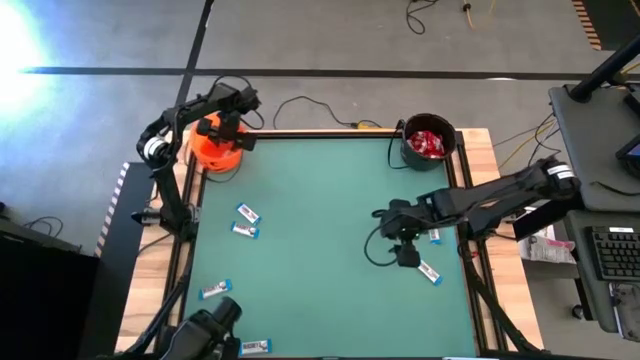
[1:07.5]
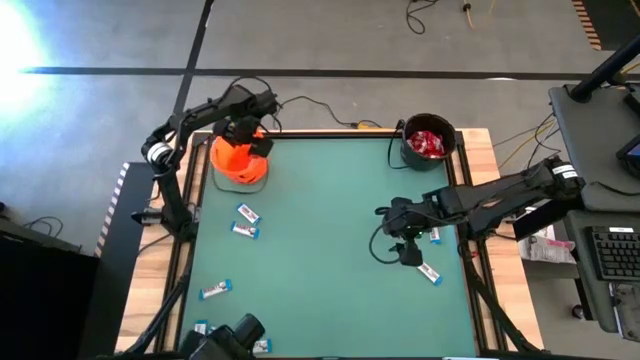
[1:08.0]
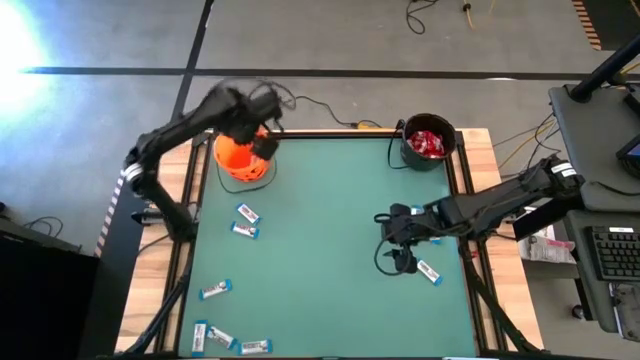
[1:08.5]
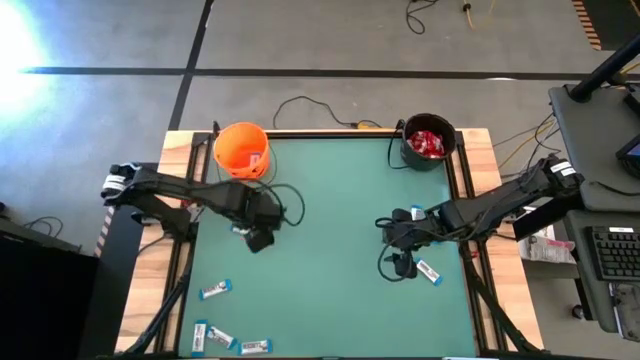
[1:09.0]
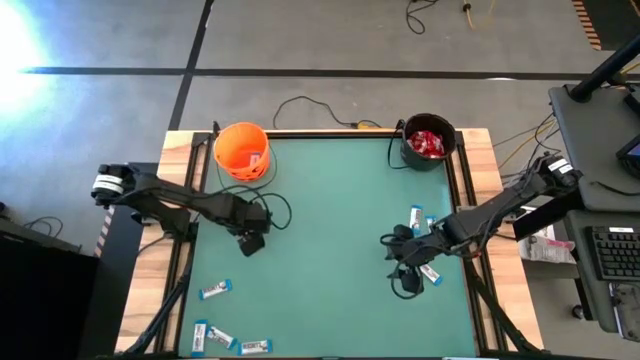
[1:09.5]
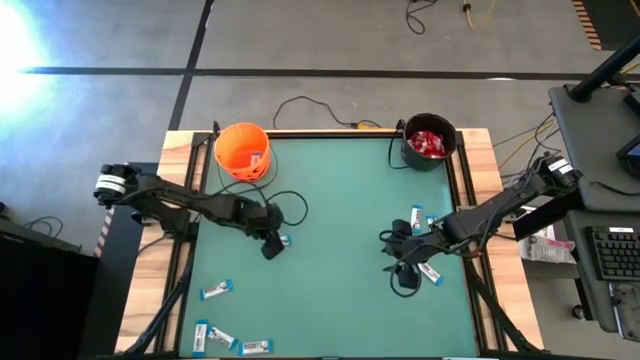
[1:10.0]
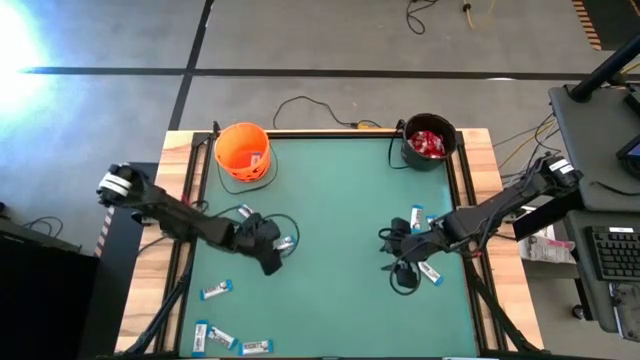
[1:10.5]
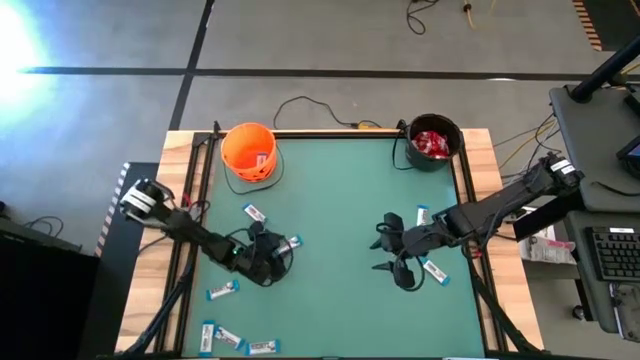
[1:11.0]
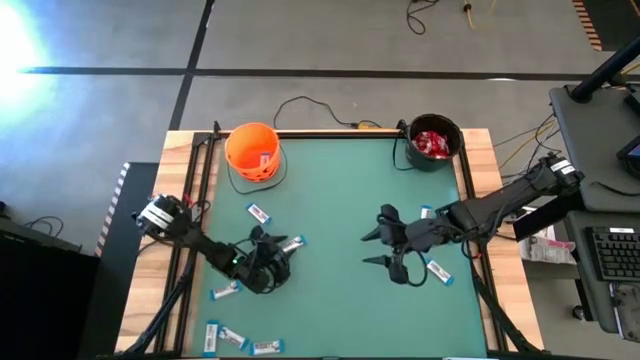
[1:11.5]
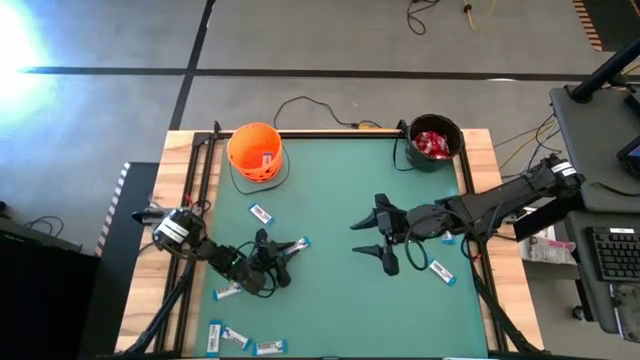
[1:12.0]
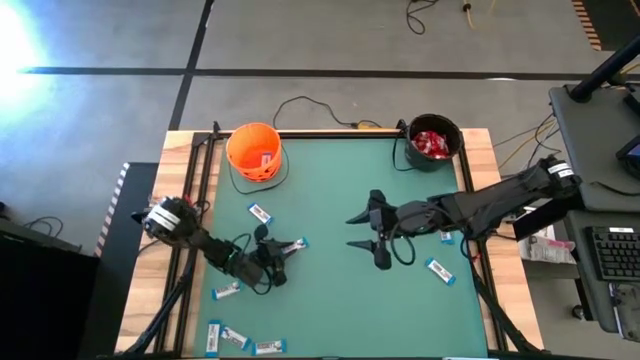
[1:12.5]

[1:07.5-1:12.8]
Task: Sort candy by brand, put in halloween buckets
Put the white chocolate into the orange bucket

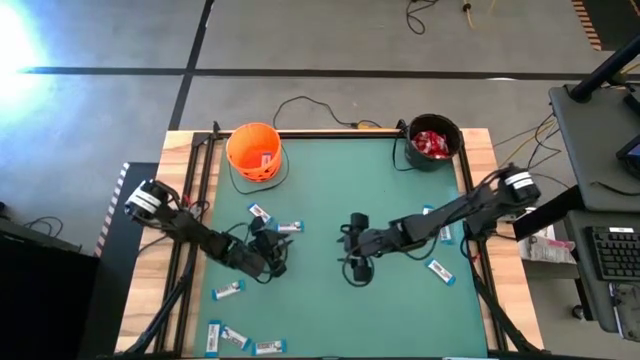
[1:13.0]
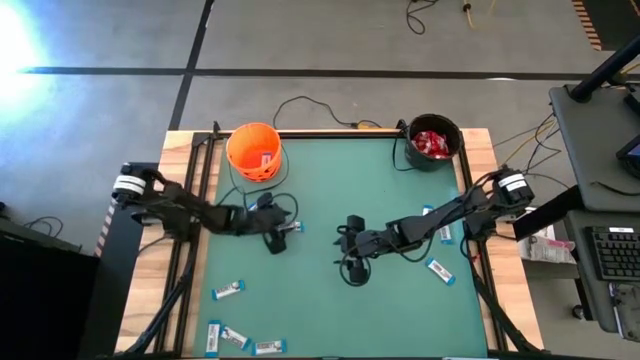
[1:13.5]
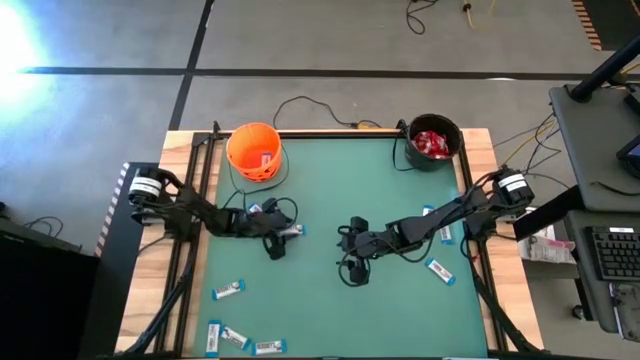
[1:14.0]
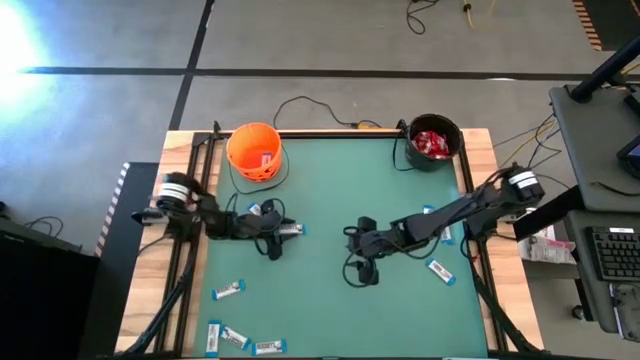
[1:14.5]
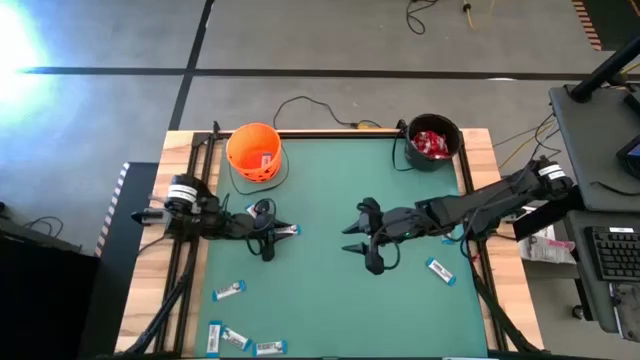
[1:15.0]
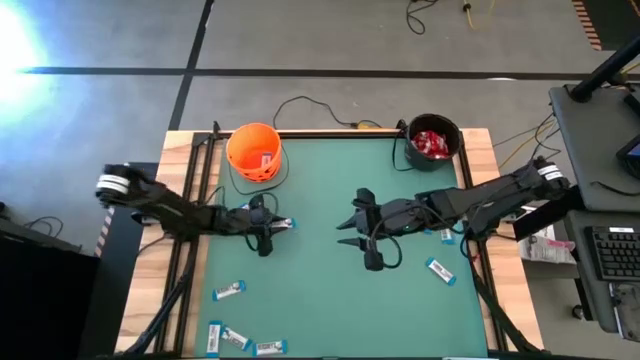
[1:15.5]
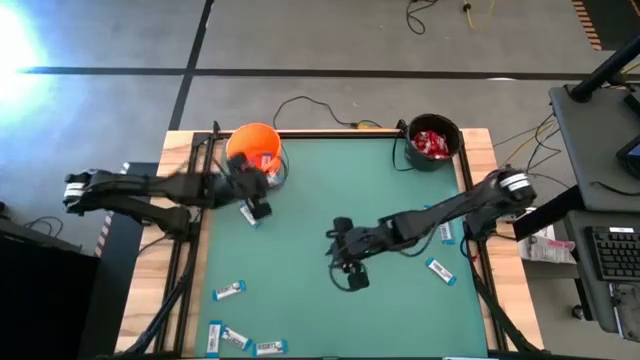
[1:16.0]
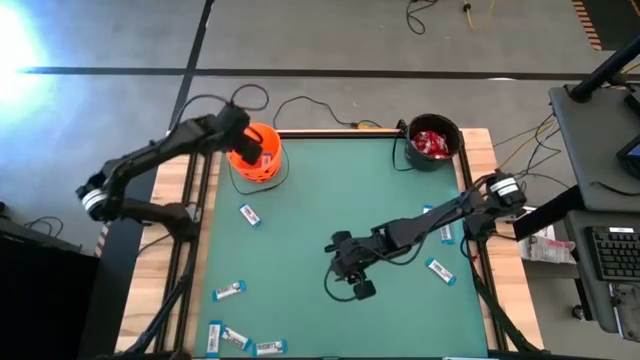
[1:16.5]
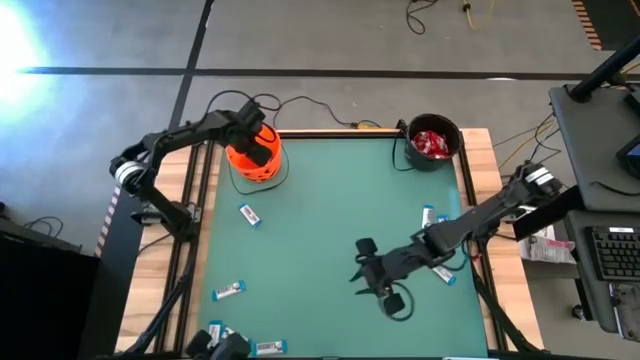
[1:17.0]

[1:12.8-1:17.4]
Put the white chocolate into the orange bucket

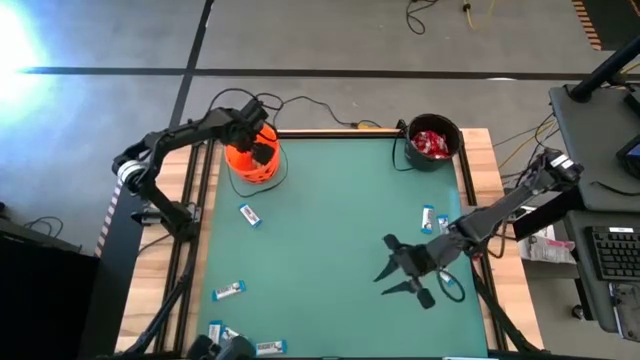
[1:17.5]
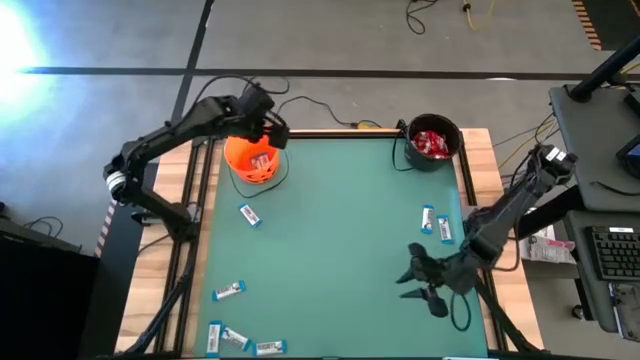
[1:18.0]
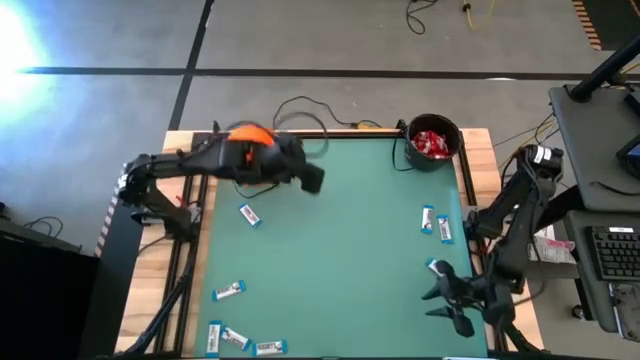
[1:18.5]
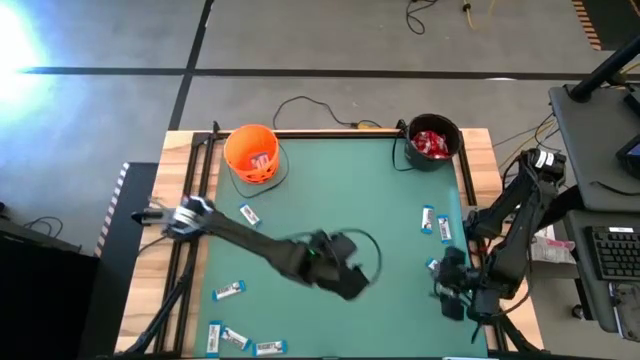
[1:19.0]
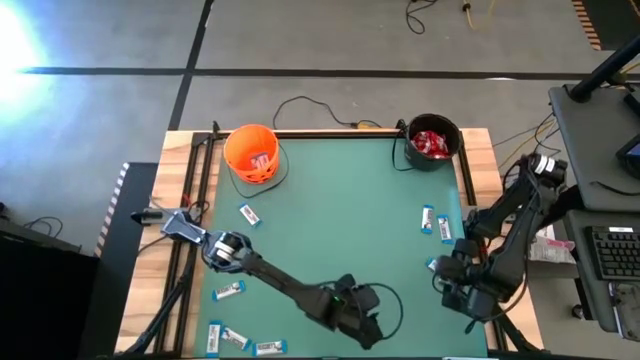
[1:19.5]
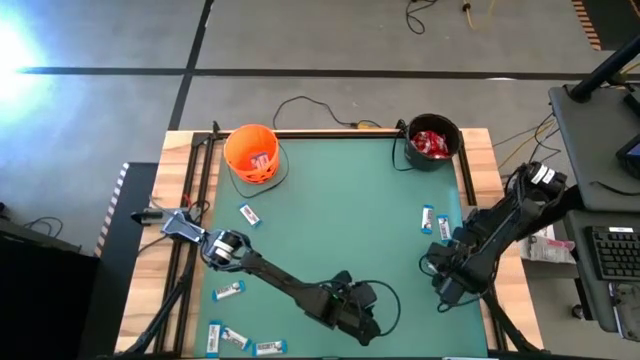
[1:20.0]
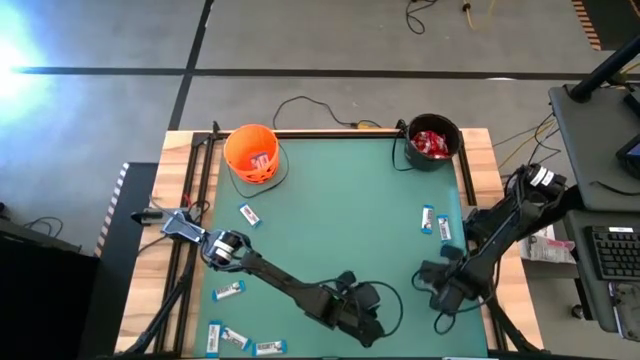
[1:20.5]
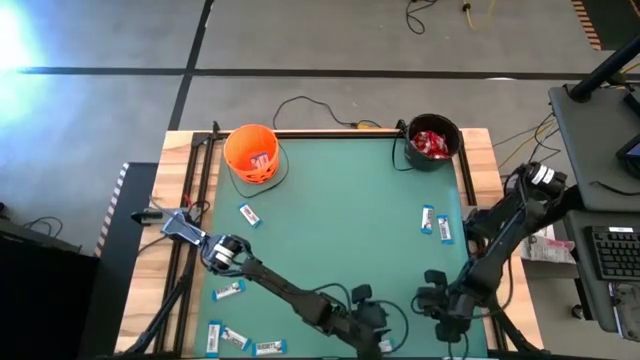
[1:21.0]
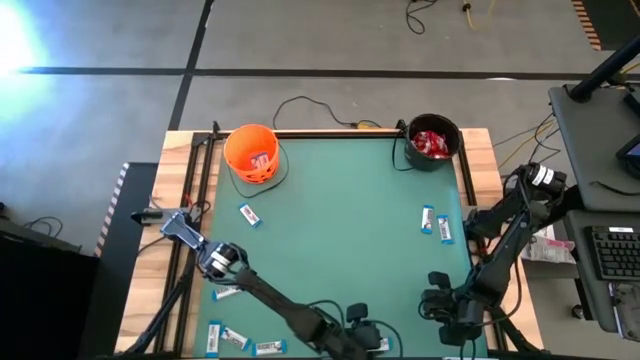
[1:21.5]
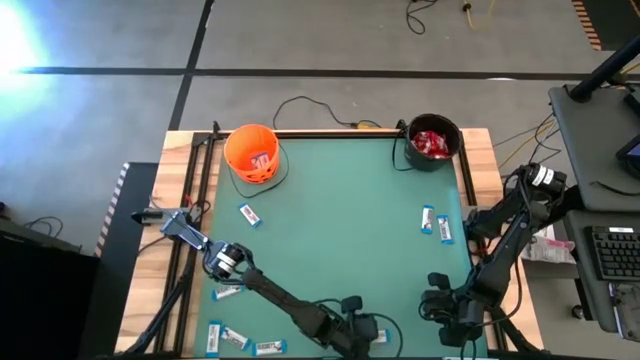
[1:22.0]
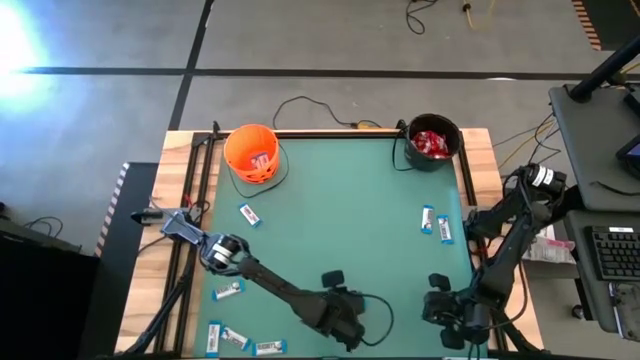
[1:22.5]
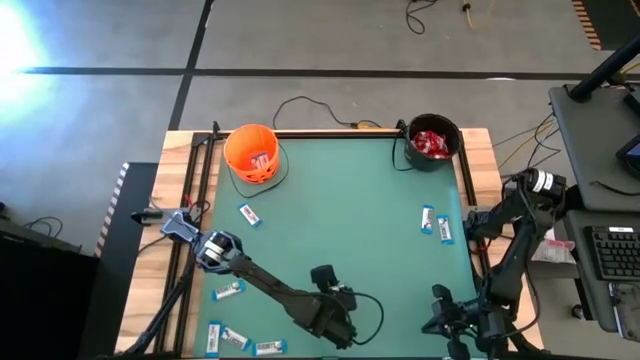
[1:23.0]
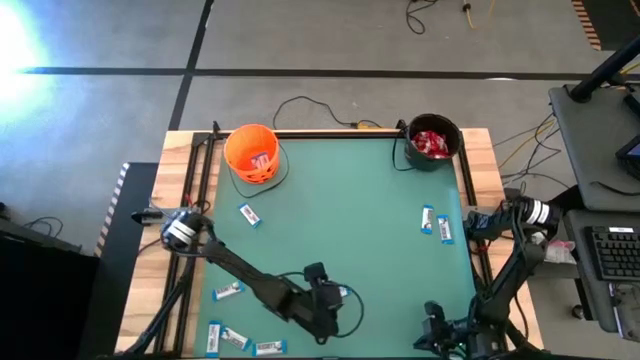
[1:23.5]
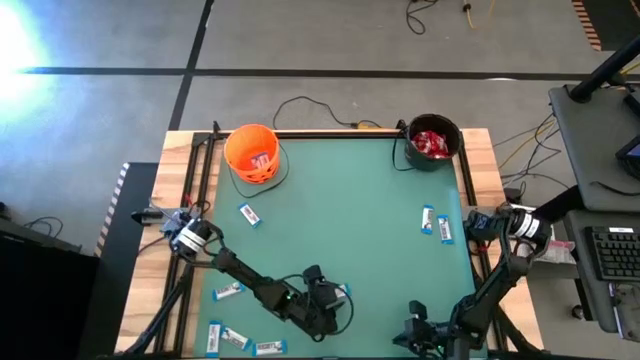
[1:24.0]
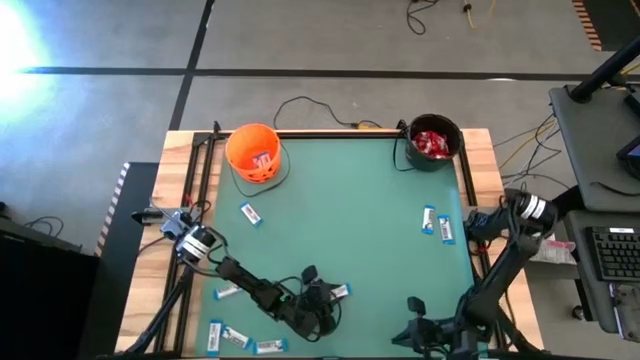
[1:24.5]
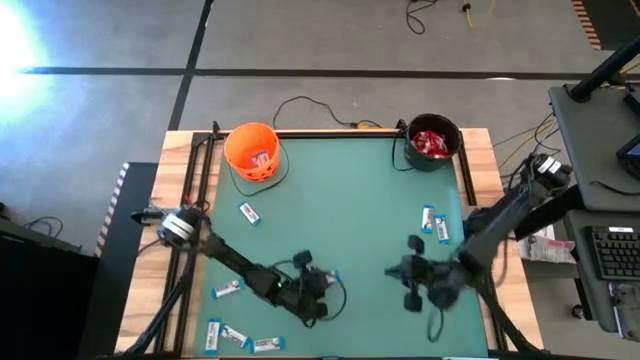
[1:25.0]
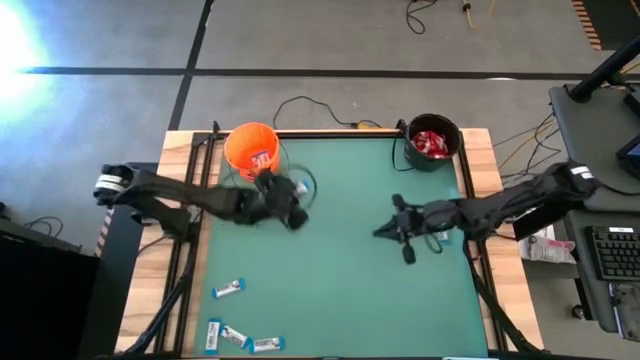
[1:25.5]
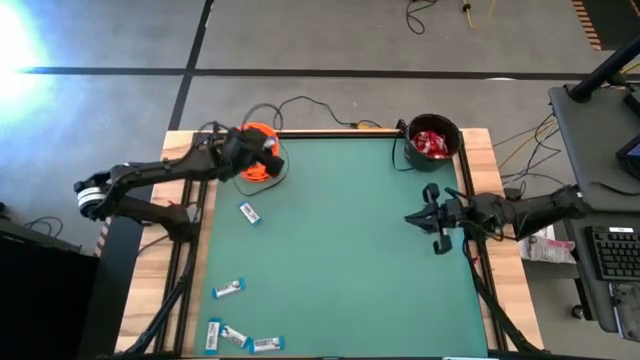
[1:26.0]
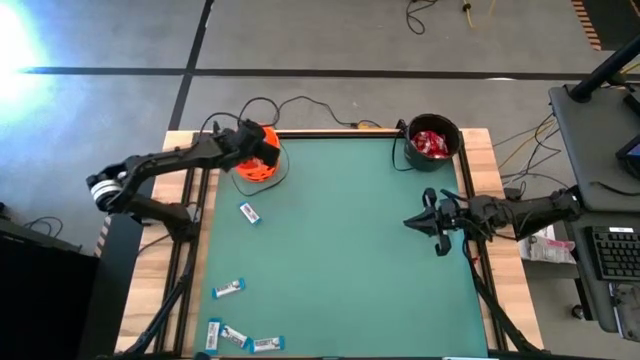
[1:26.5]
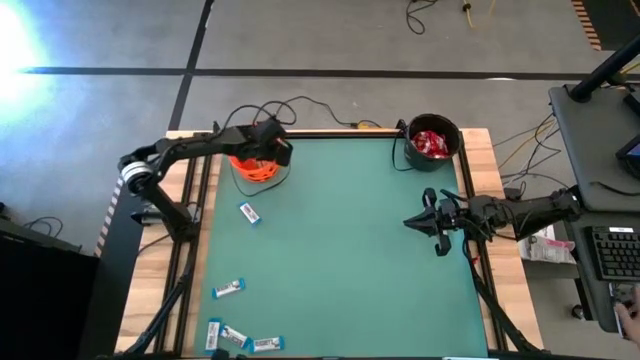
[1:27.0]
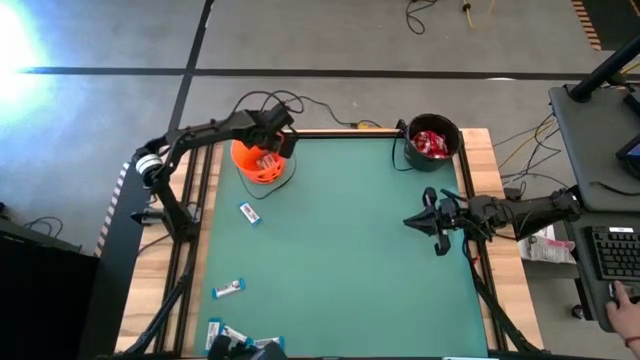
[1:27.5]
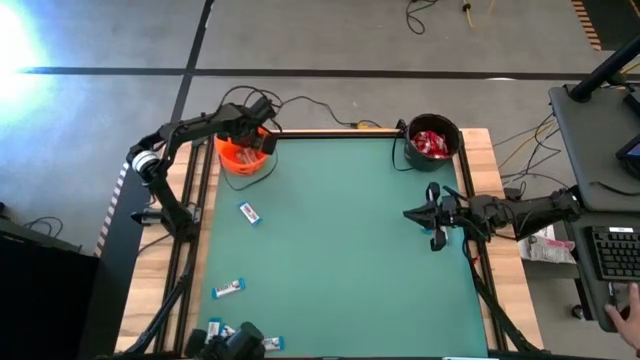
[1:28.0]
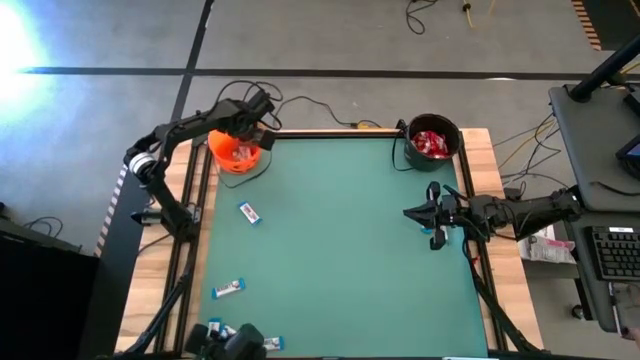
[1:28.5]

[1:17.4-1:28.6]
Put the white chocolate into the orange bucket

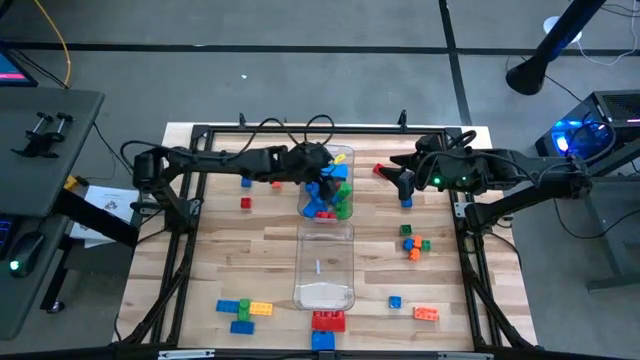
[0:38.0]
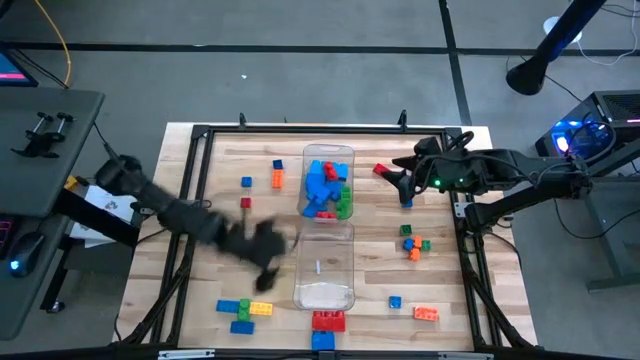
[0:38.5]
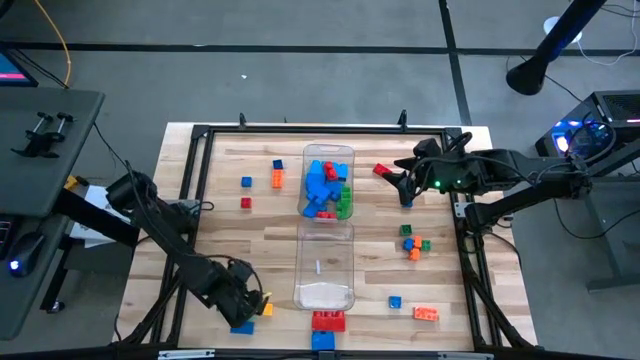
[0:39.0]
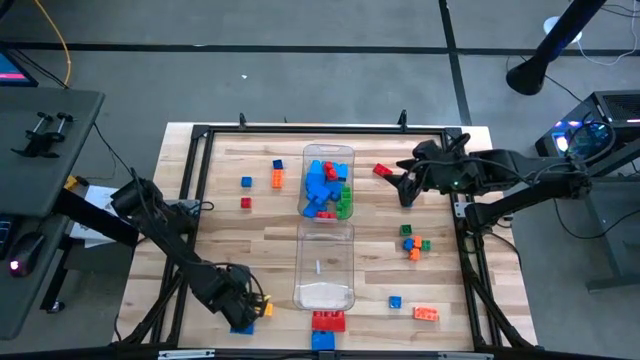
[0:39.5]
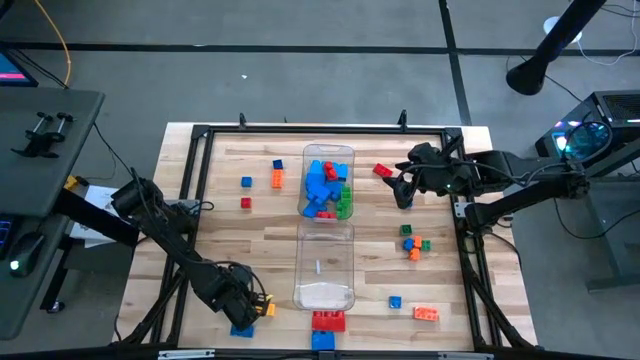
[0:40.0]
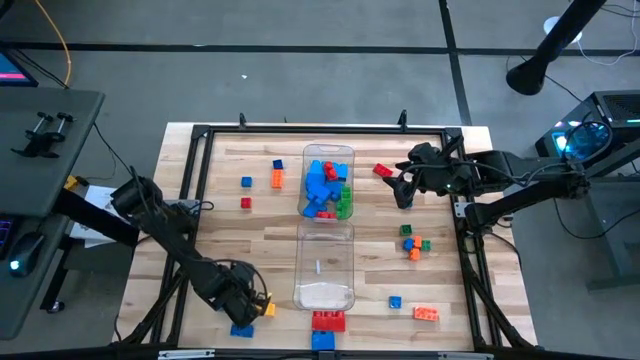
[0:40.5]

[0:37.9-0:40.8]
Task: Sort blocks by size
Put the large green game piece in the top transparent bin
